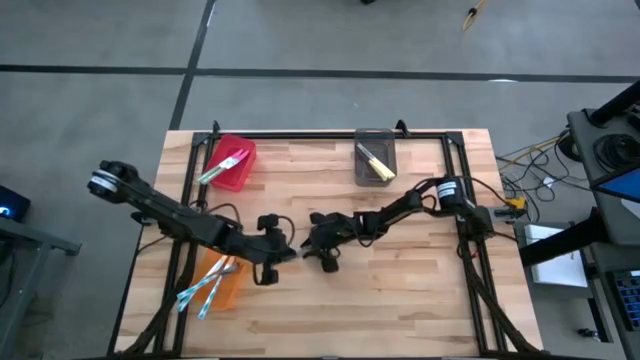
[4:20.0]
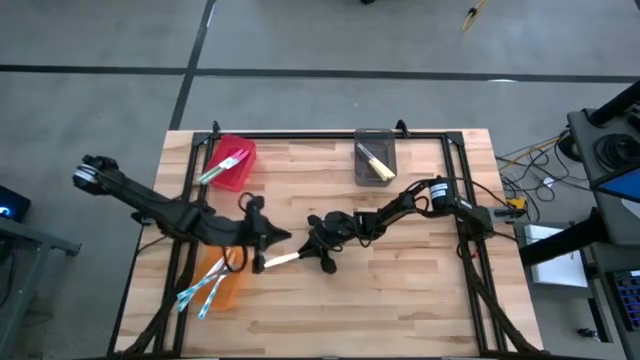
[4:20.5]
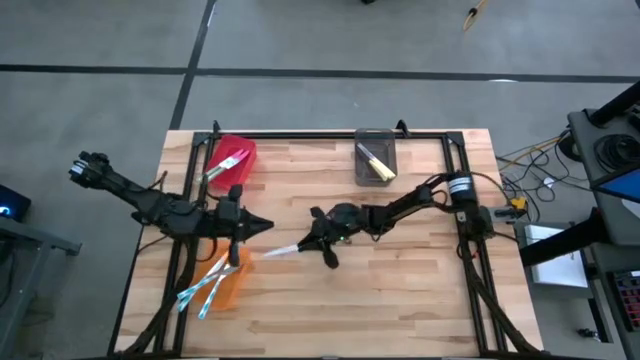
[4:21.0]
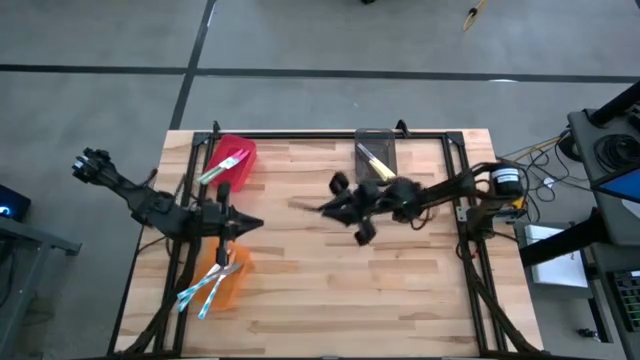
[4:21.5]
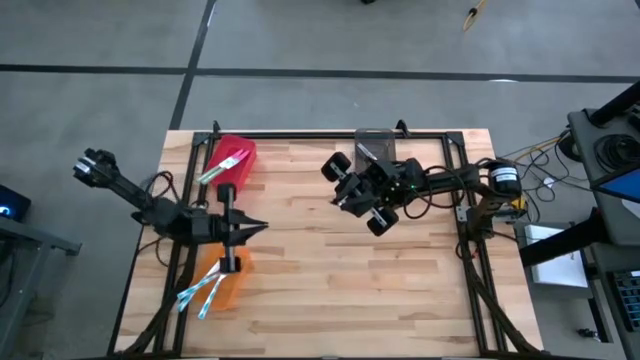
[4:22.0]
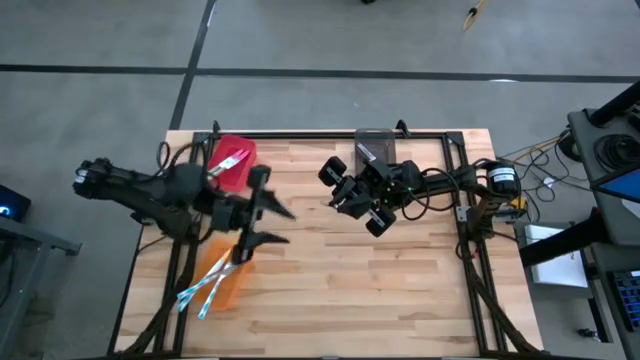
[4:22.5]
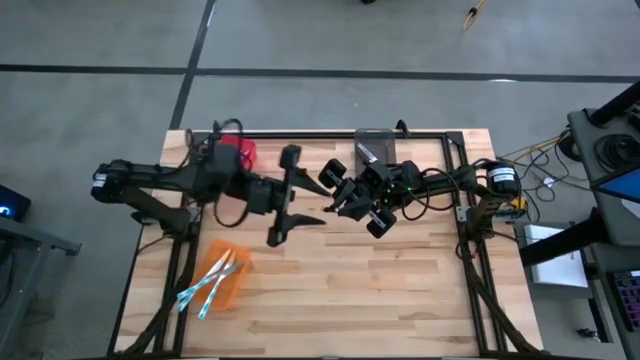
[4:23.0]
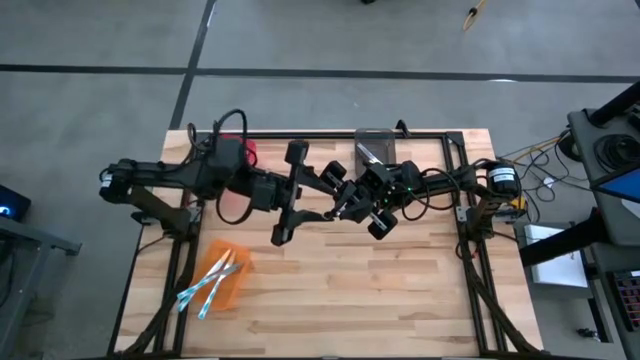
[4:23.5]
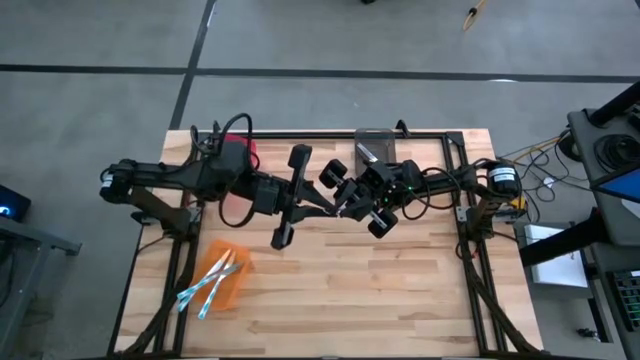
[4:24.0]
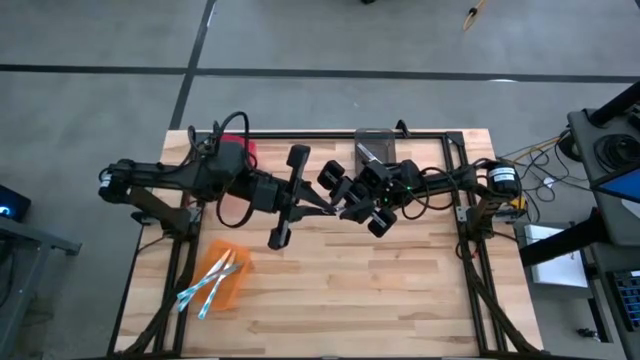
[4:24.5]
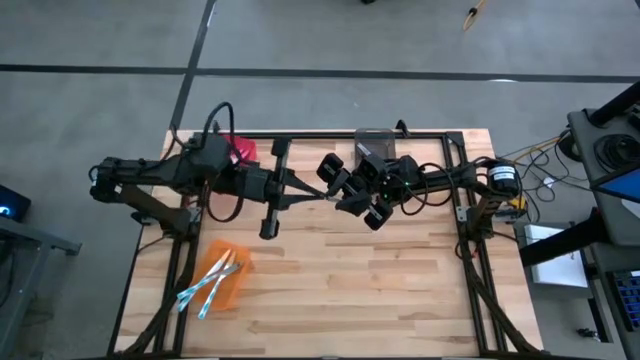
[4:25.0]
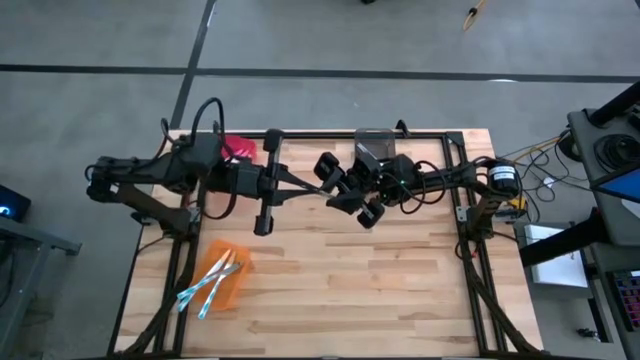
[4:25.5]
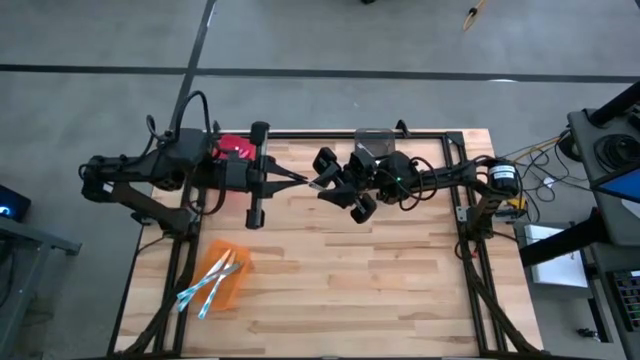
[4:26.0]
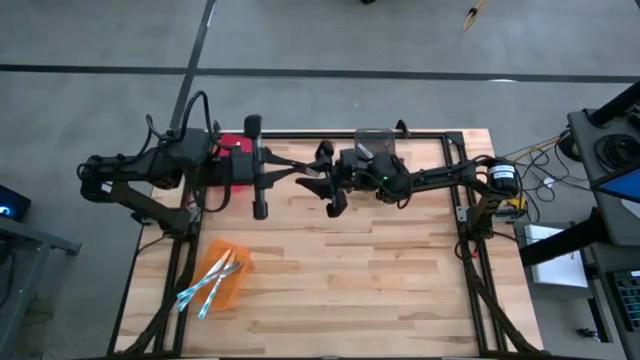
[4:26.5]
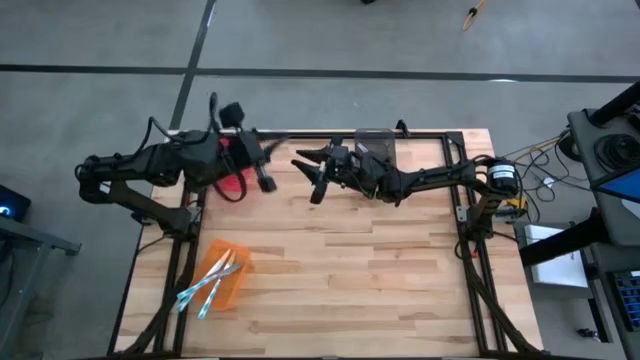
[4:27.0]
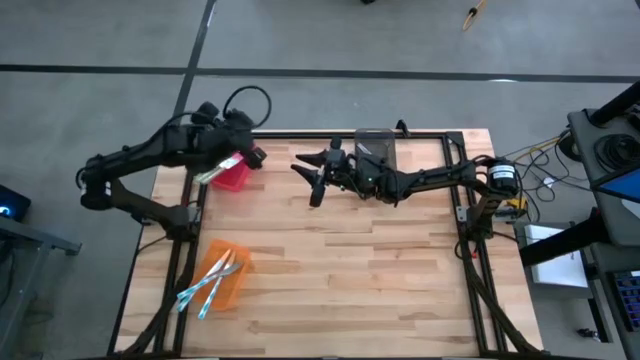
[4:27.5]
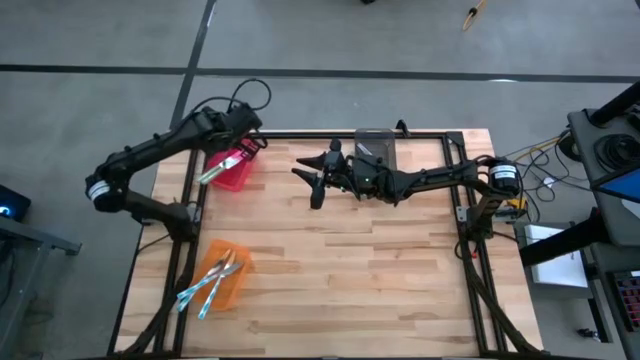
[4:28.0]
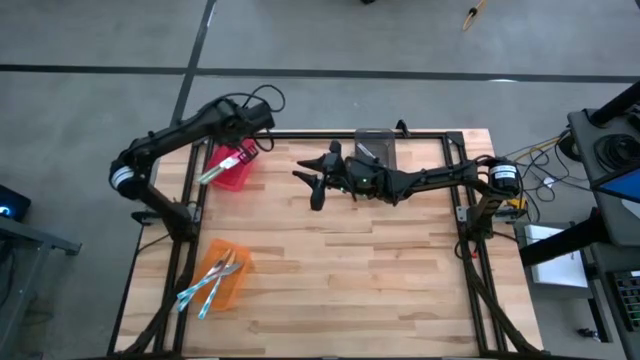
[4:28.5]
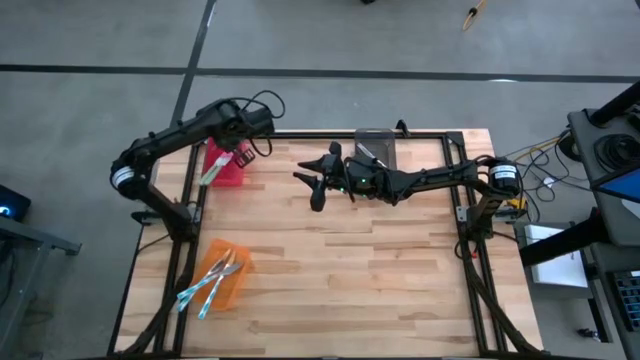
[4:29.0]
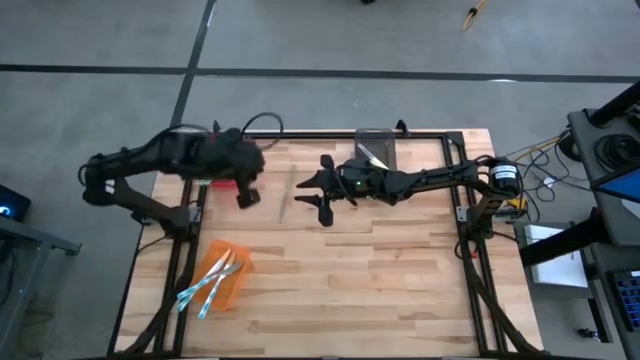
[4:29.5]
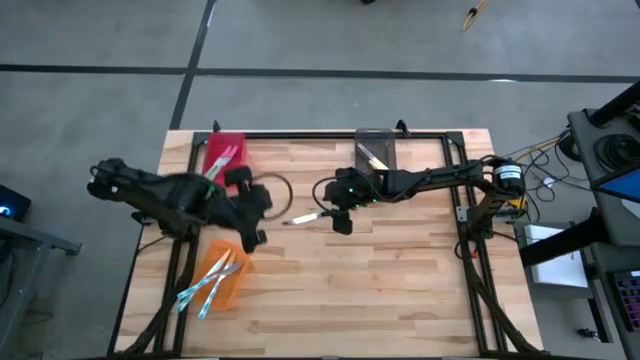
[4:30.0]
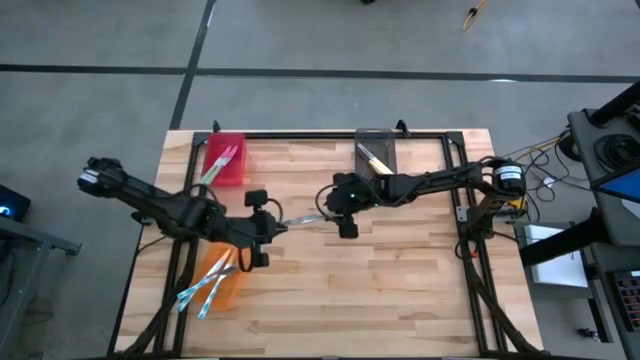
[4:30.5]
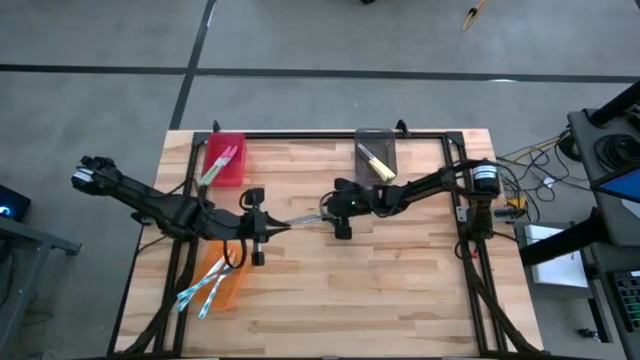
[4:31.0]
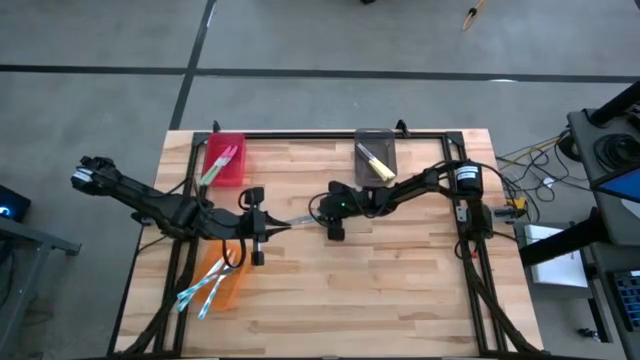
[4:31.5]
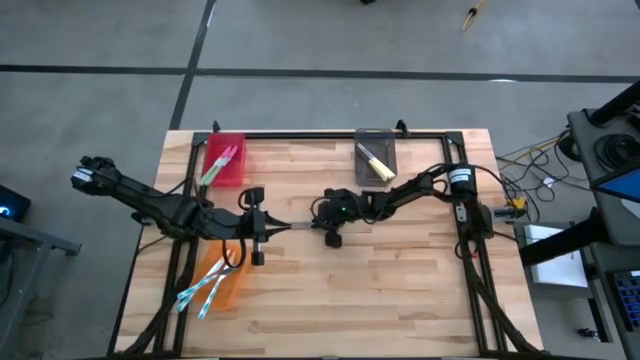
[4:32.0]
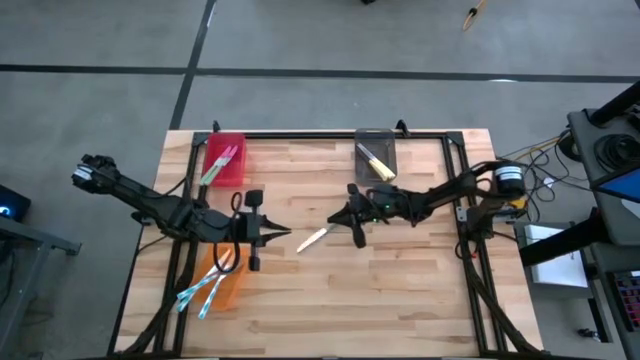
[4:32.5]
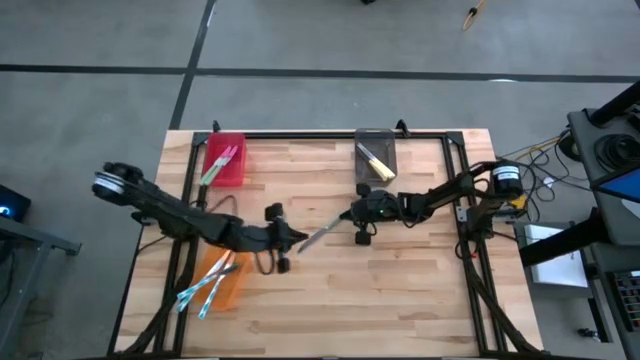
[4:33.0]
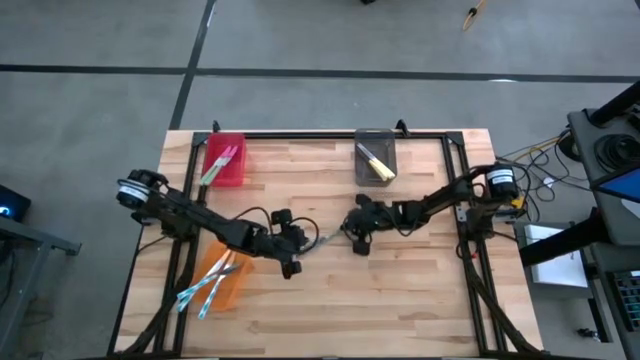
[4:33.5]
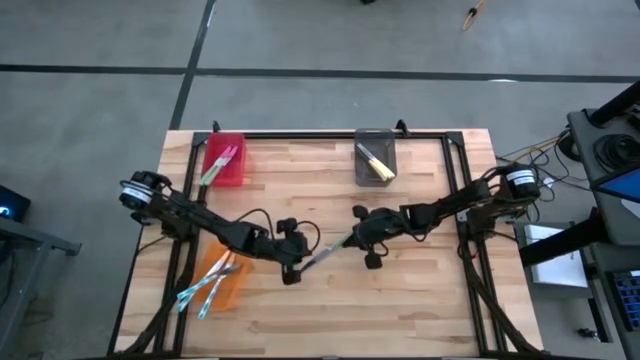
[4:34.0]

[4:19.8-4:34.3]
Task: Sort silverware by color (type)
Put the green knife into the red bin

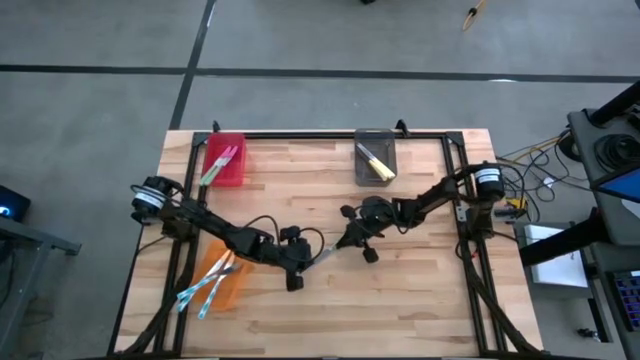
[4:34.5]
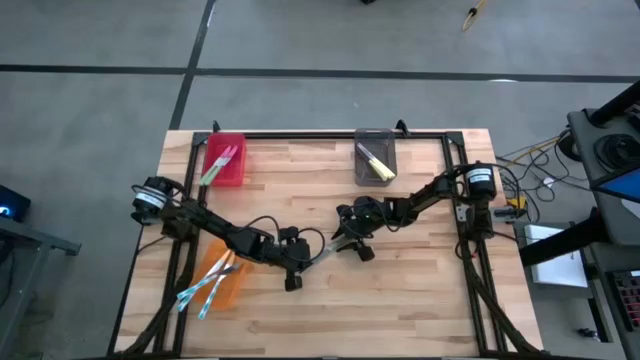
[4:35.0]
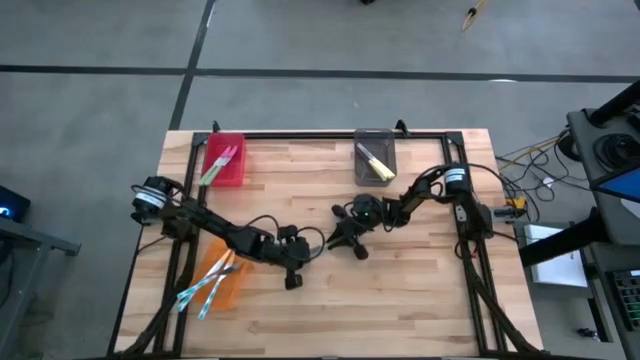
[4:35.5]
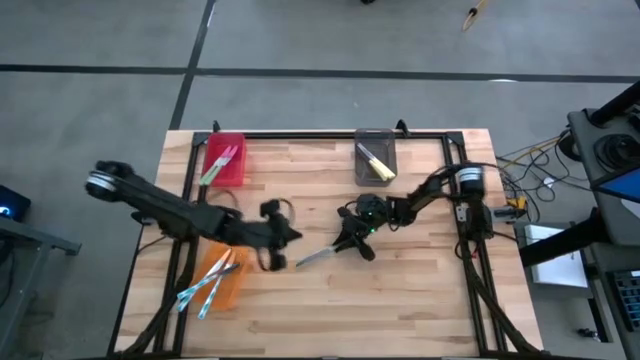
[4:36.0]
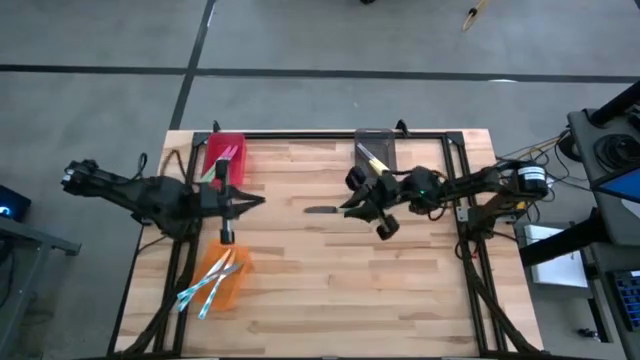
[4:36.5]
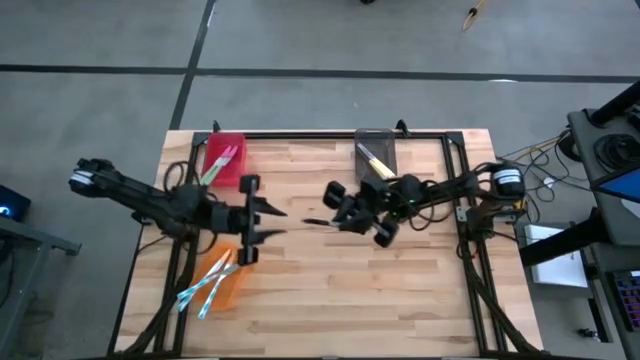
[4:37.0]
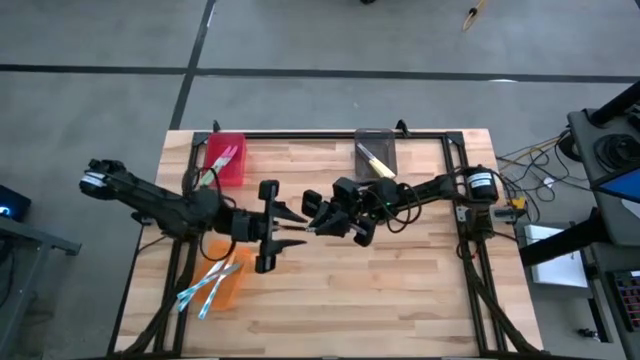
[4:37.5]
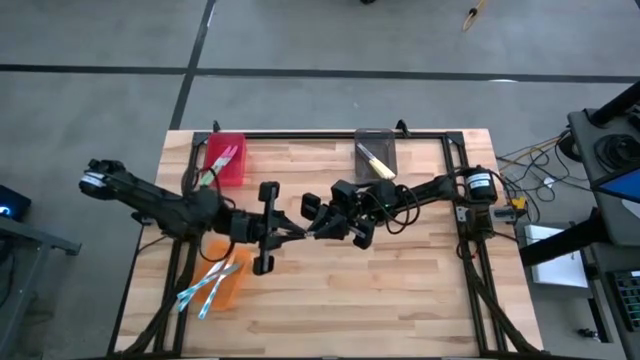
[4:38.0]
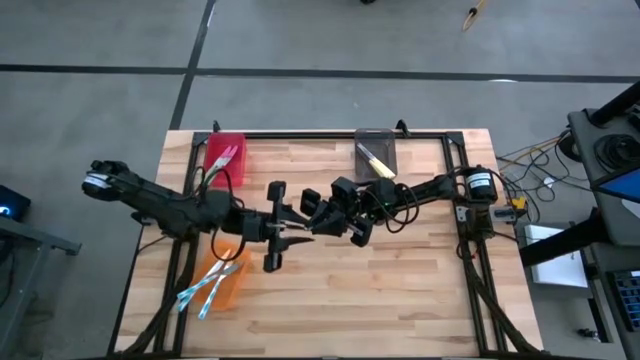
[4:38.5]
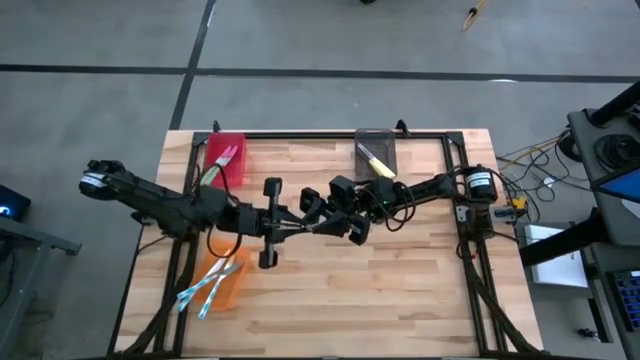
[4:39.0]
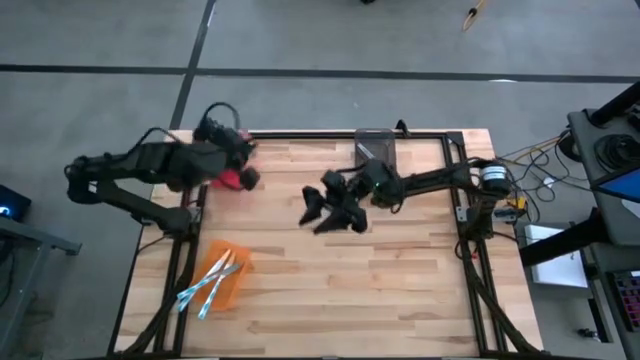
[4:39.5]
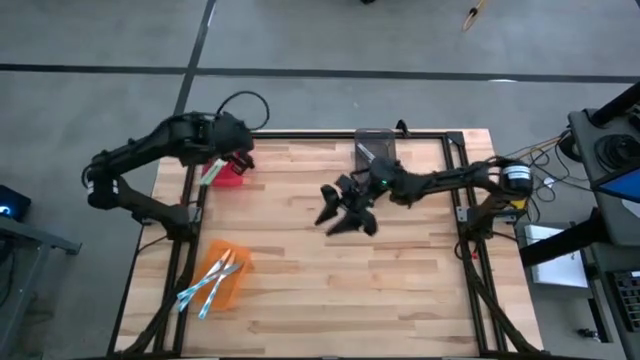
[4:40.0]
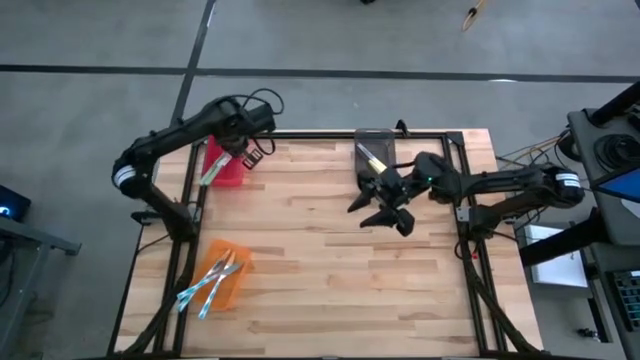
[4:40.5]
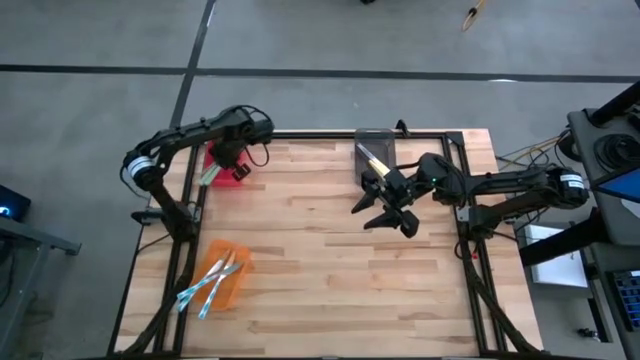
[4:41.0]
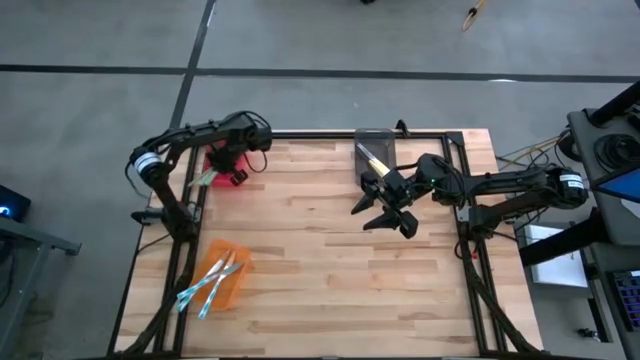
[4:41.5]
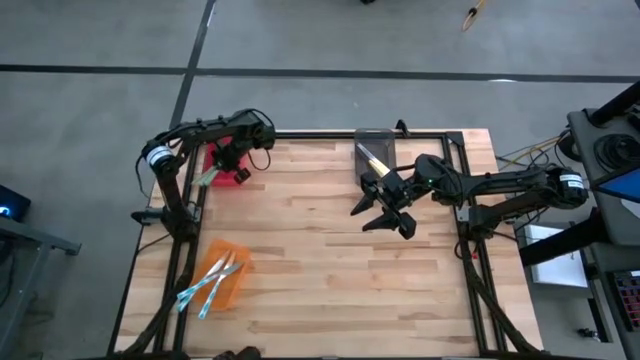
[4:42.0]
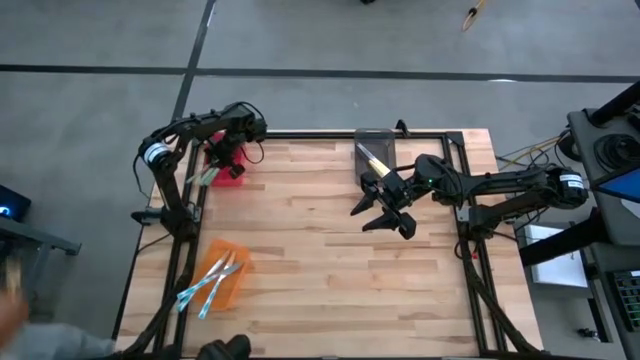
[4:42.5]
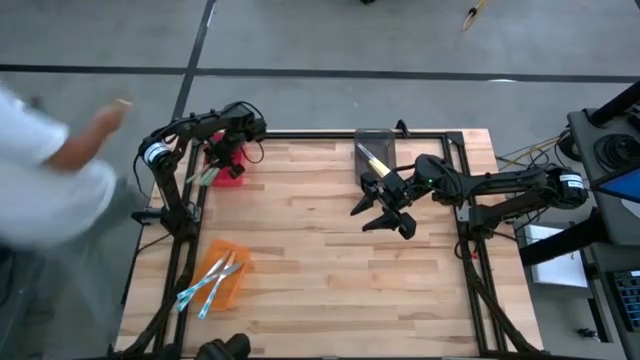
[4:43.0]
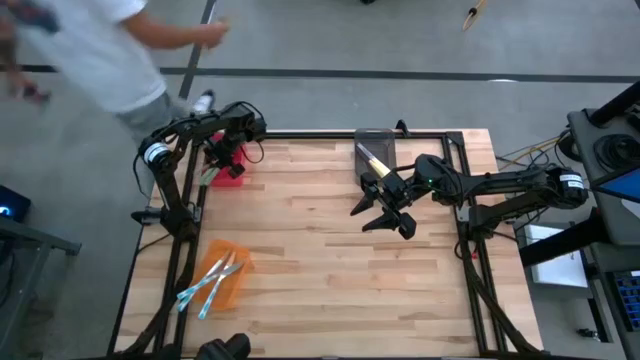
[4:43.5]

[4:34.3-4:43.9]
Put the green knife into the red bin
